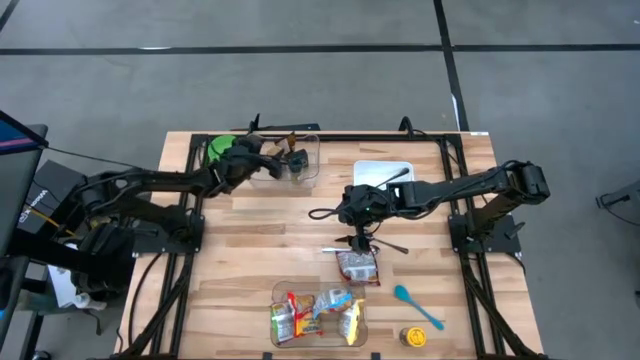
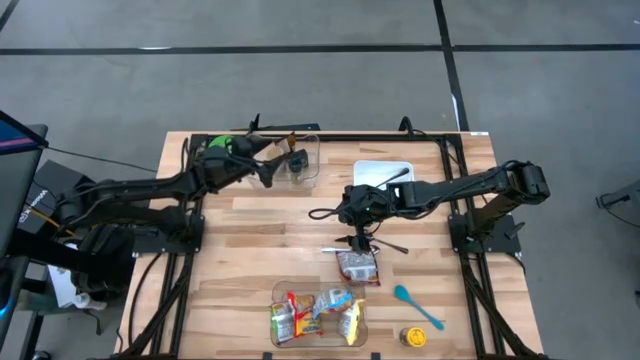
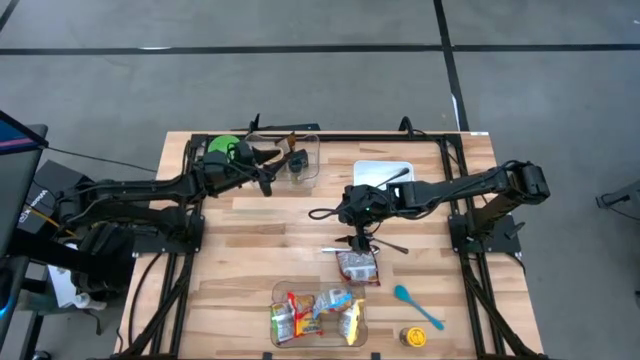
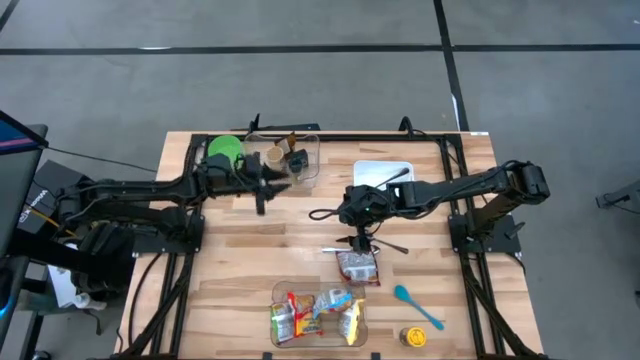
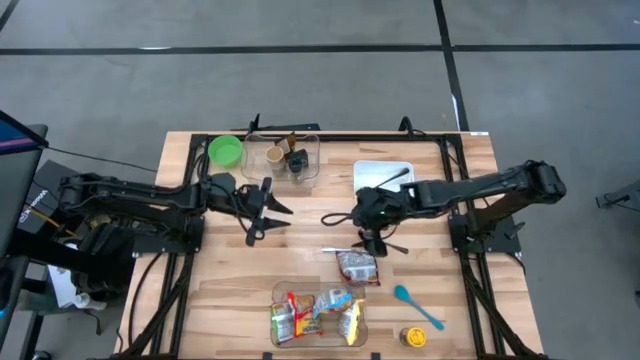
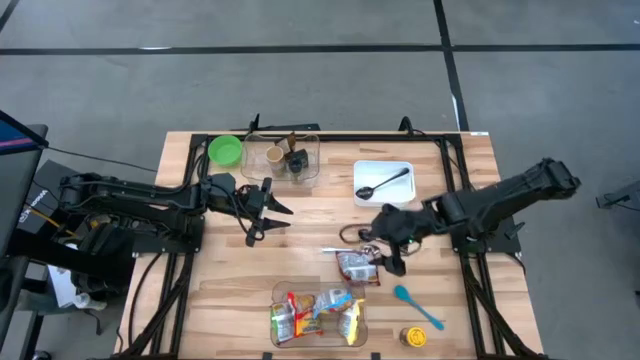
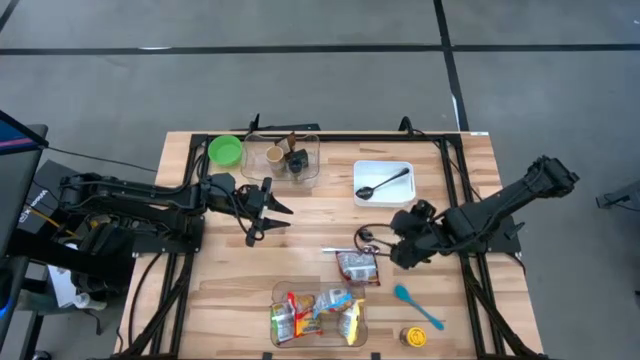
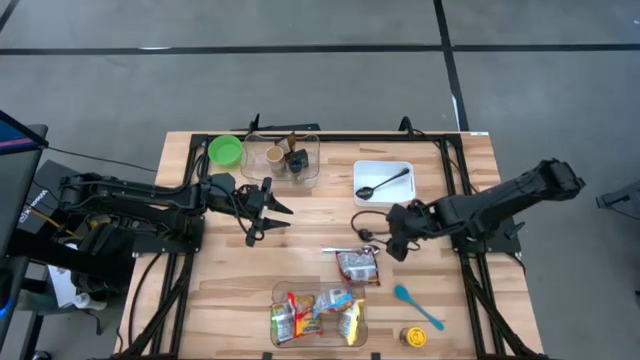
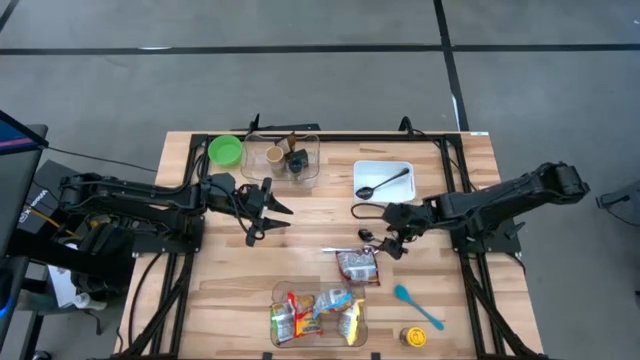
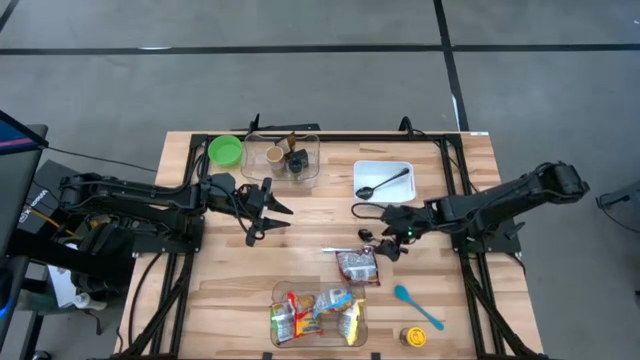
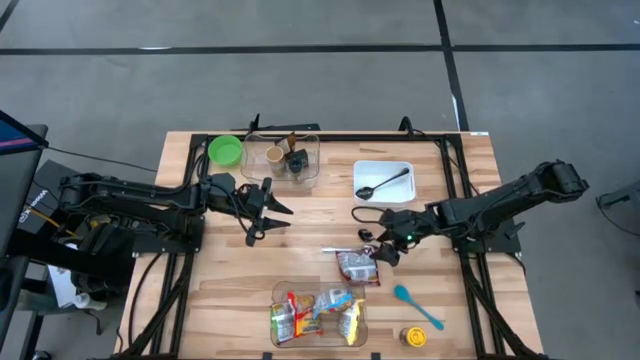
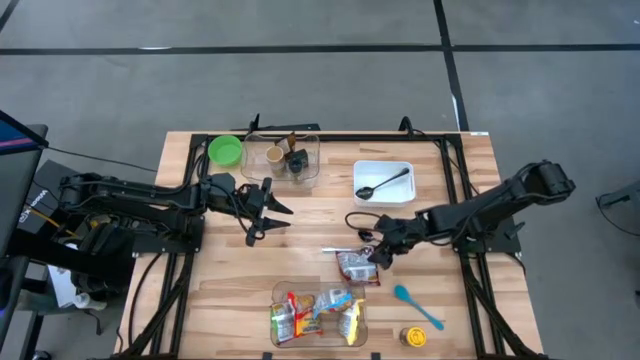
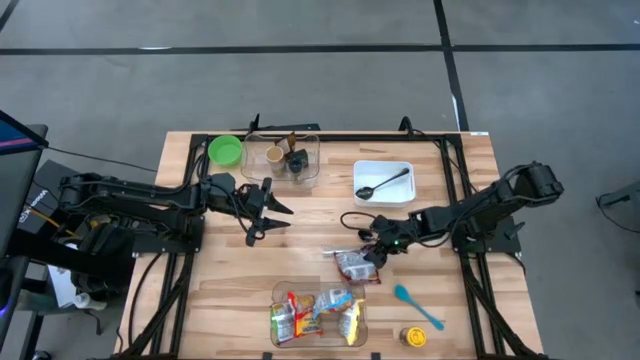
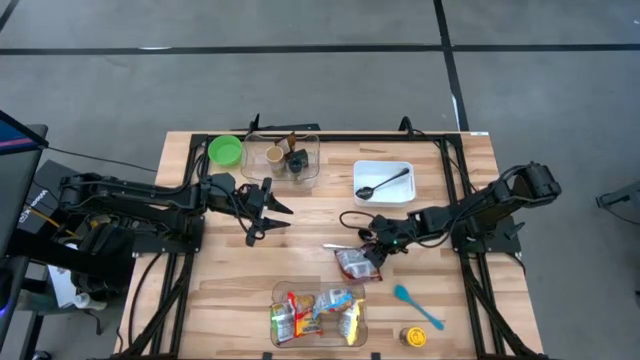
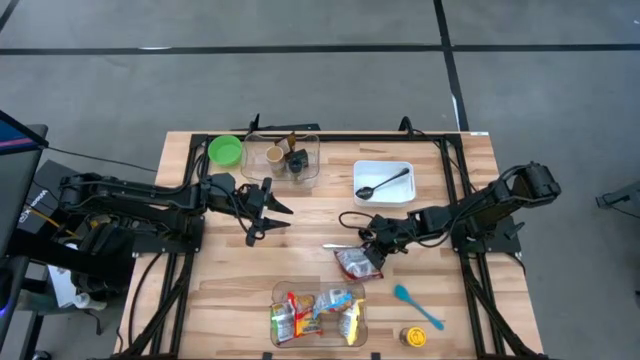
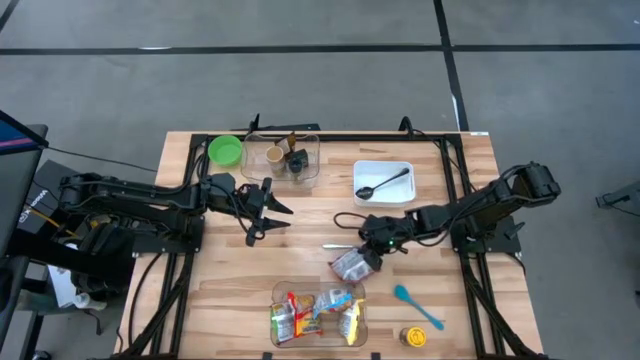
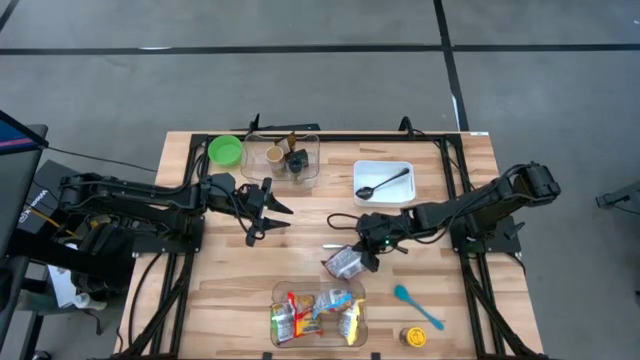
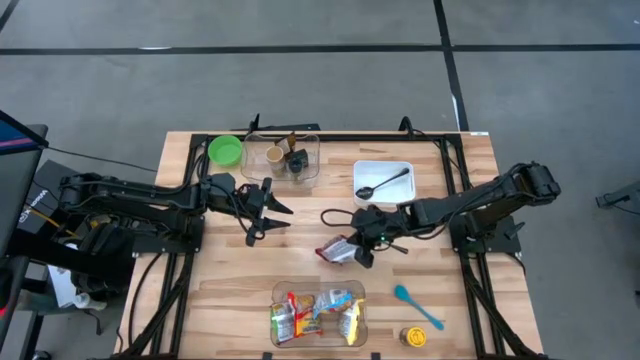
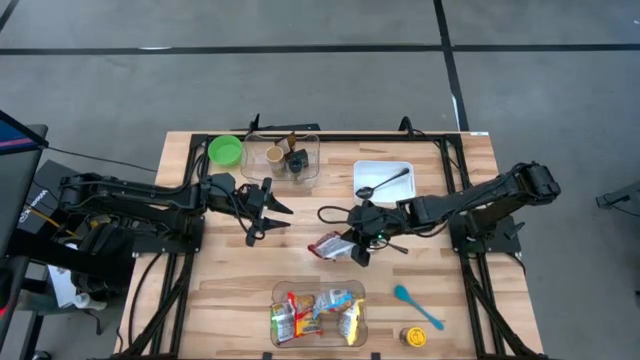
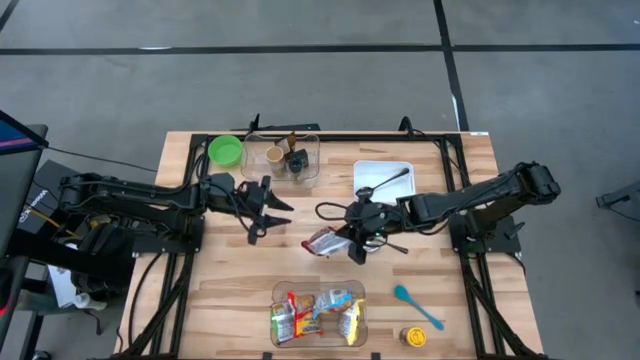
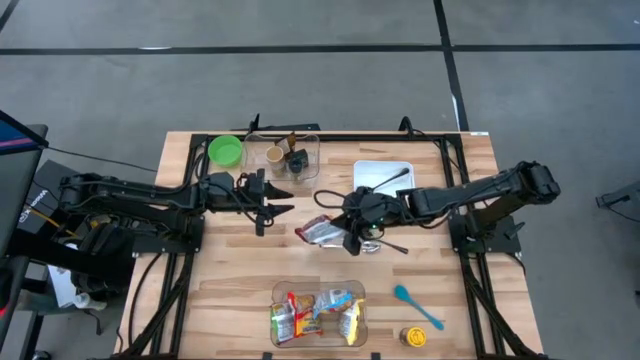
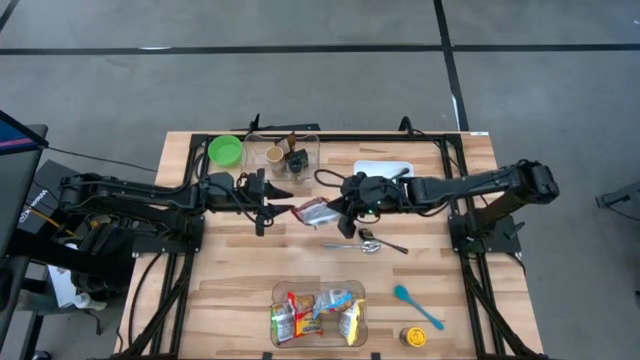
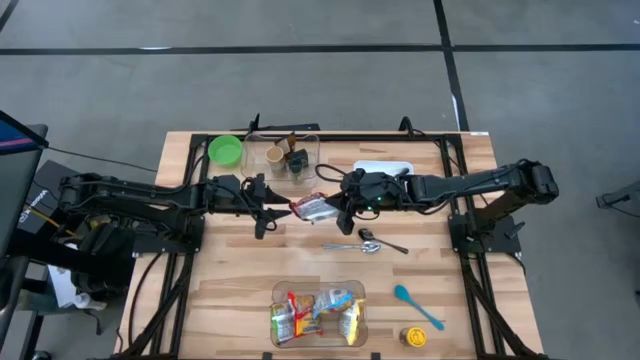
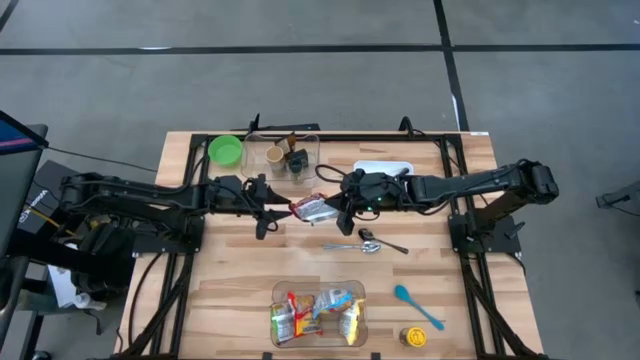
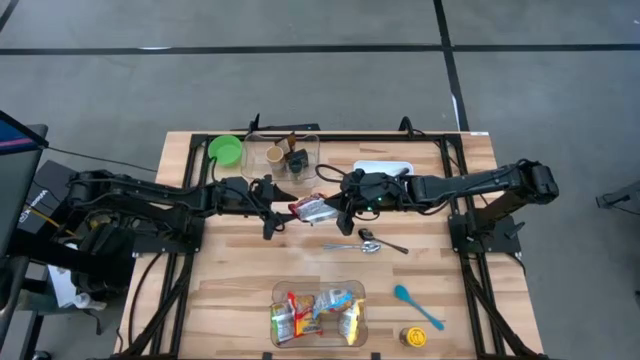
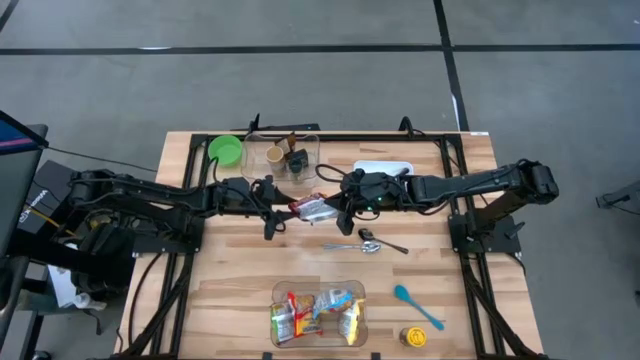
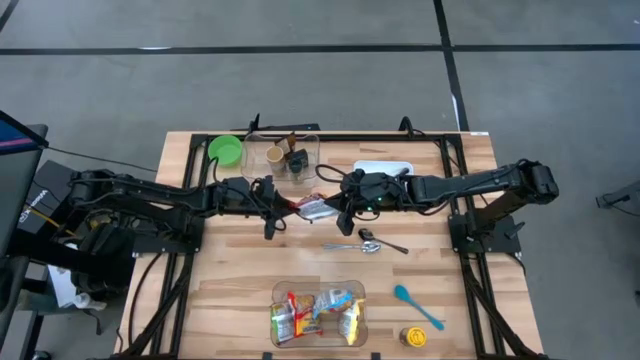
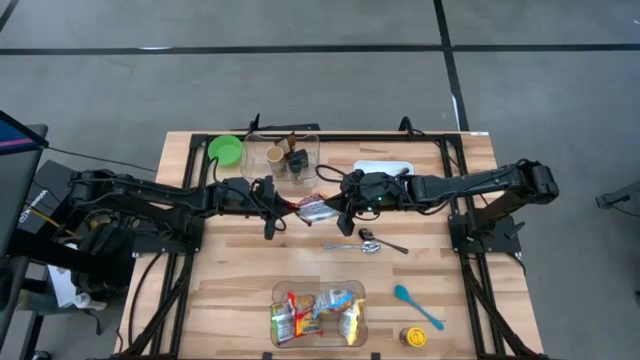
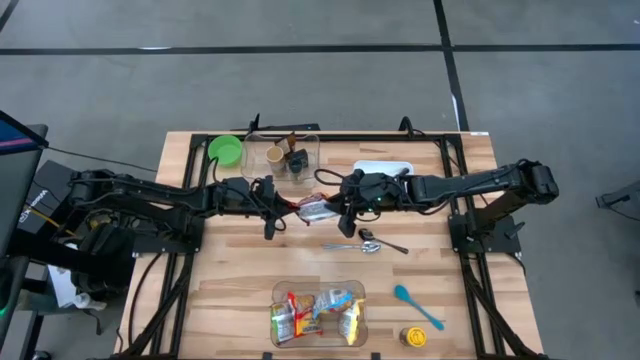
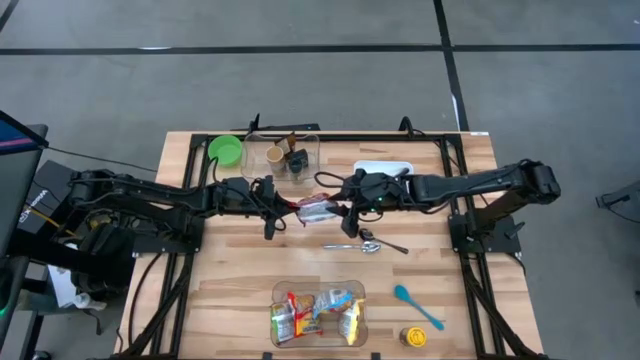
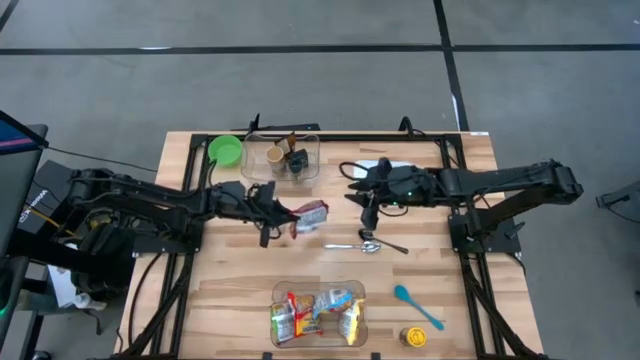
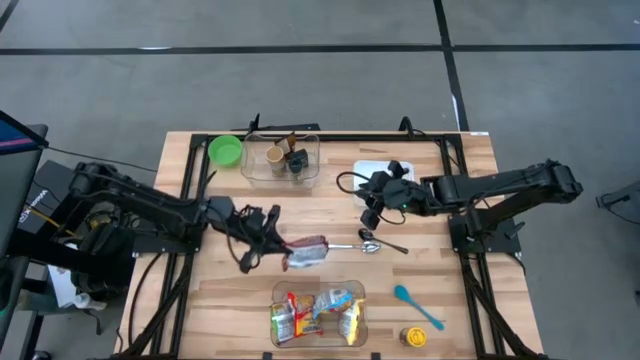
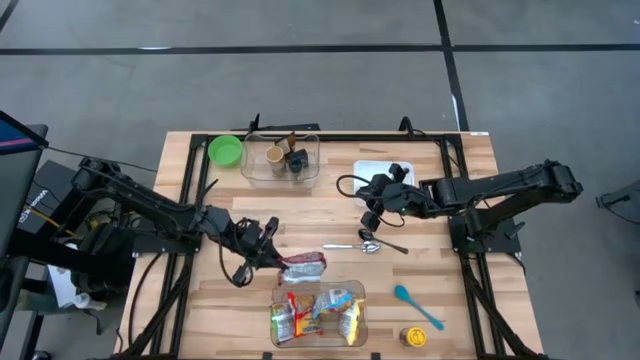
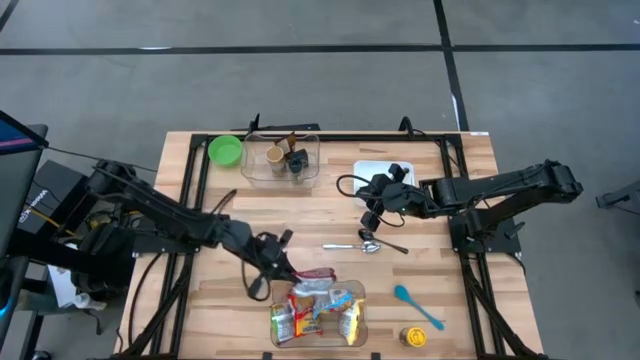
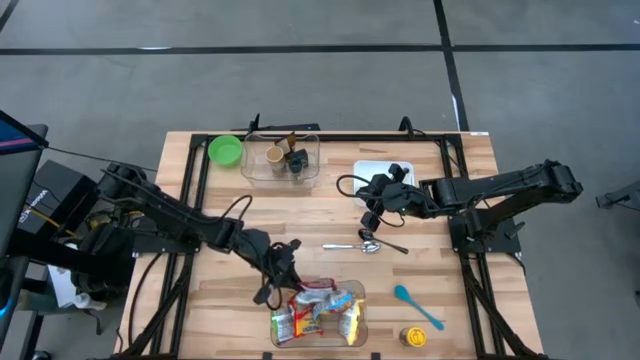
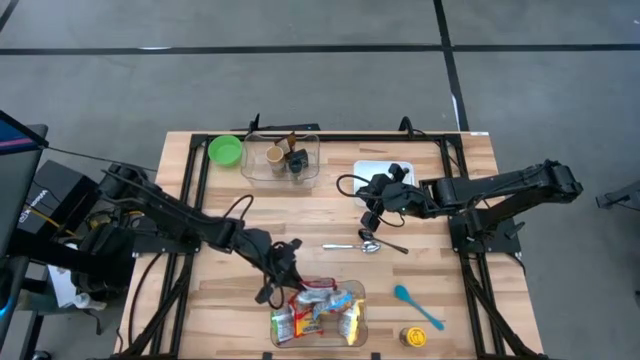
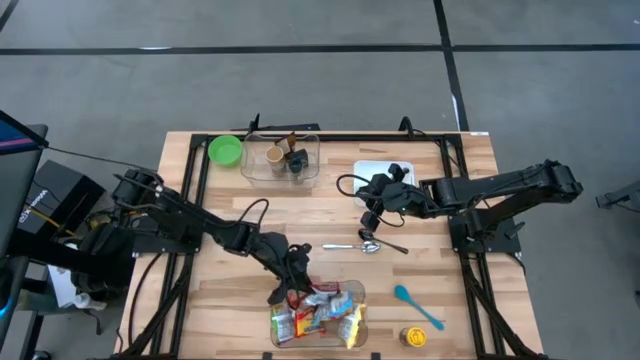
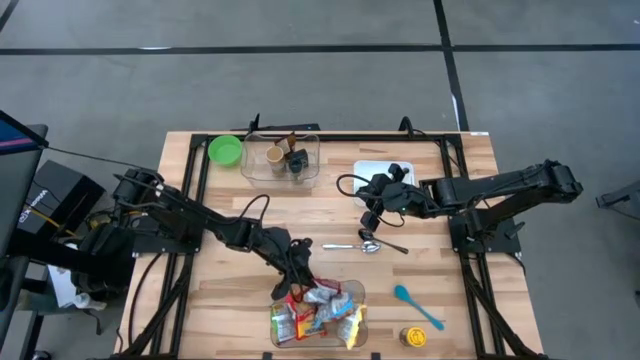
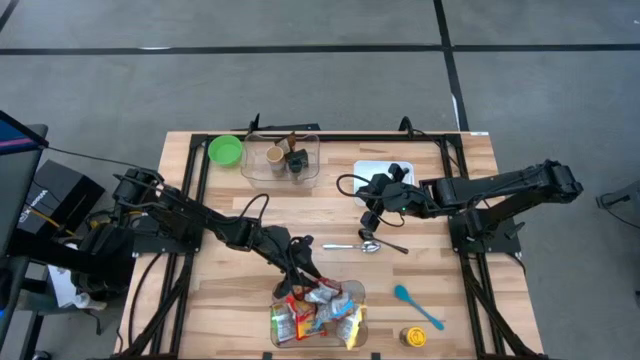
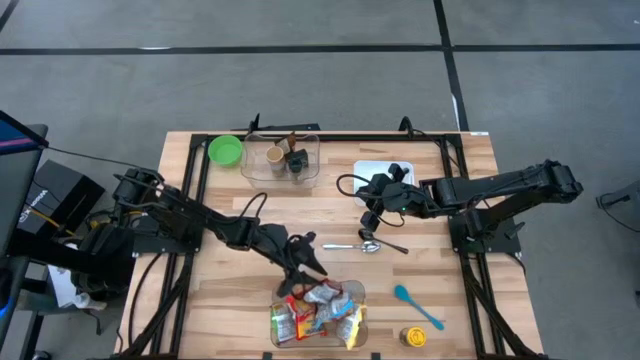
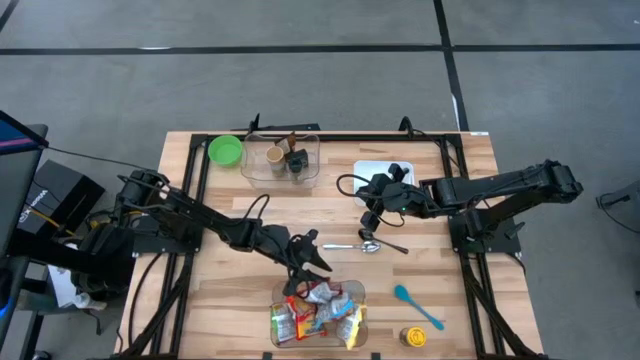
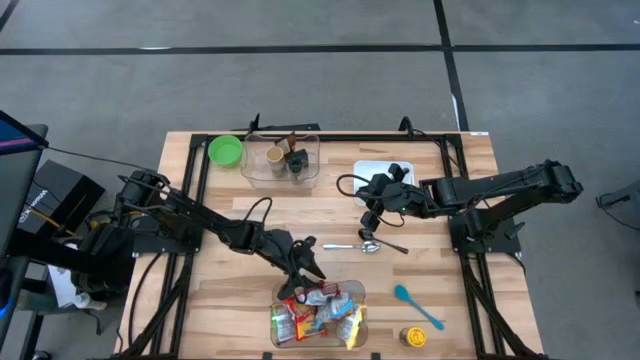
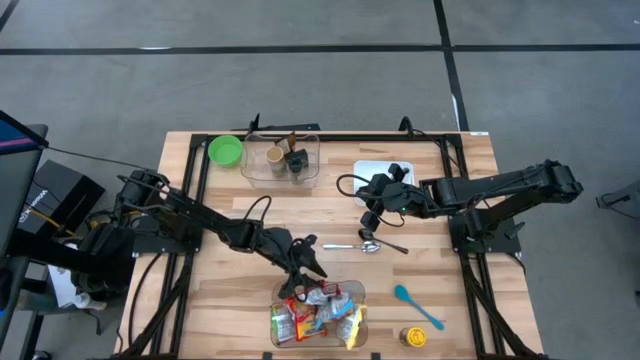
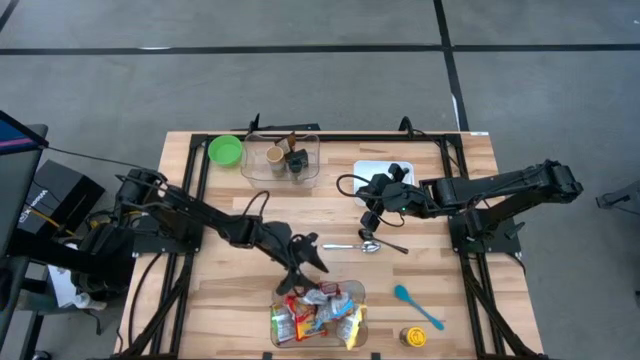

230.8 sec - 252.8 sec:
Task: Pick & Place Food Item
Put the red noodle pack into the bottom transparent bin
